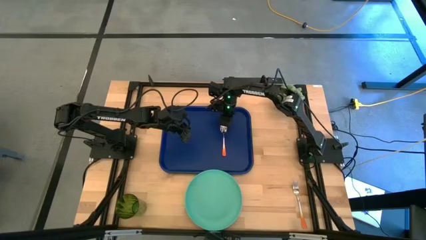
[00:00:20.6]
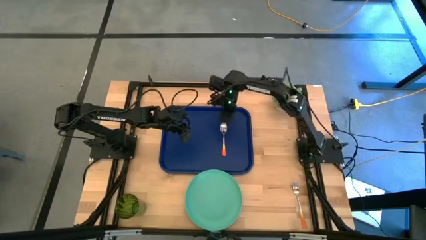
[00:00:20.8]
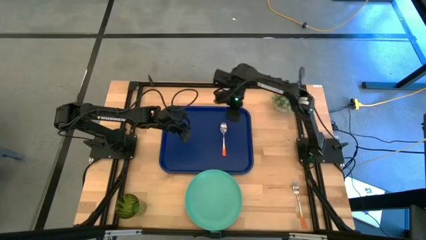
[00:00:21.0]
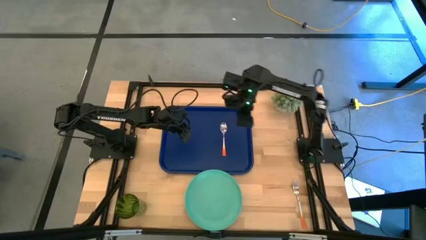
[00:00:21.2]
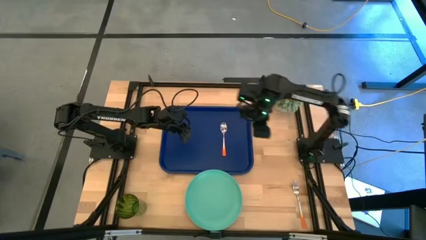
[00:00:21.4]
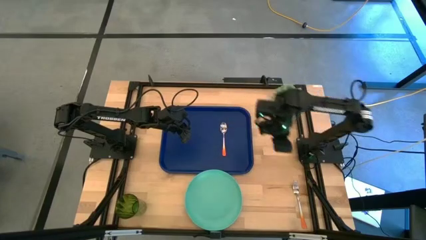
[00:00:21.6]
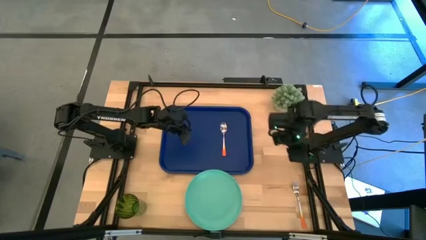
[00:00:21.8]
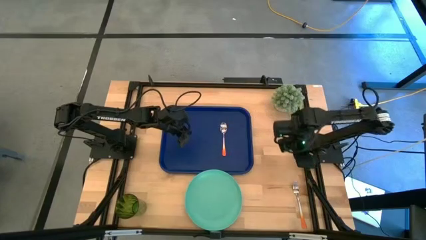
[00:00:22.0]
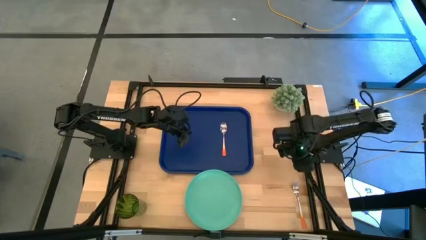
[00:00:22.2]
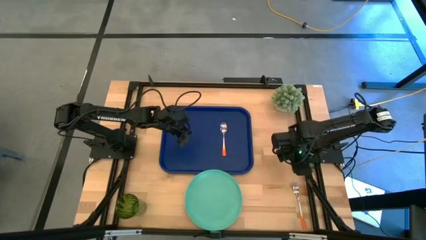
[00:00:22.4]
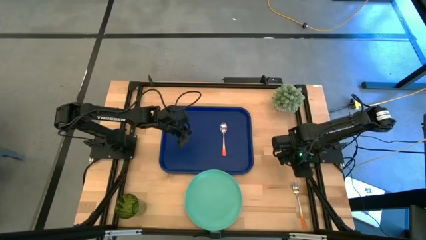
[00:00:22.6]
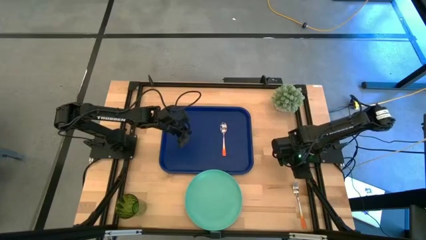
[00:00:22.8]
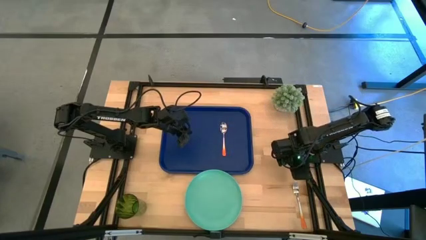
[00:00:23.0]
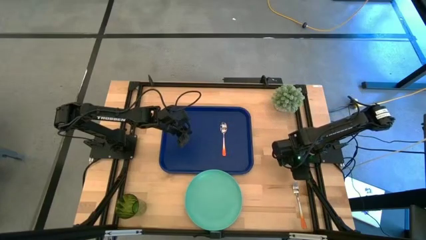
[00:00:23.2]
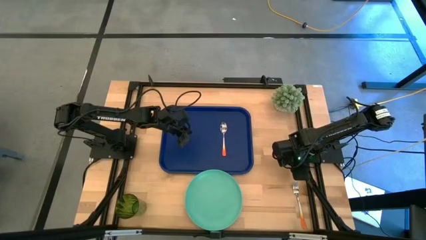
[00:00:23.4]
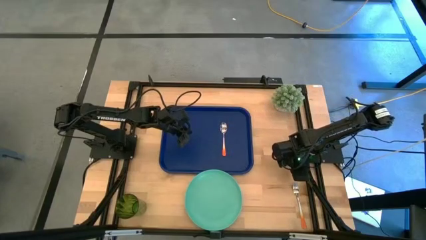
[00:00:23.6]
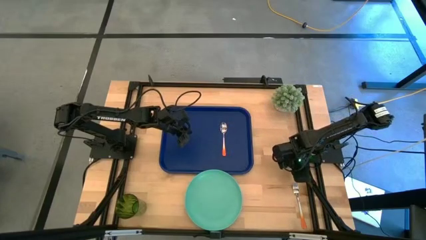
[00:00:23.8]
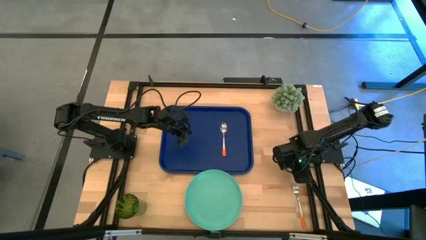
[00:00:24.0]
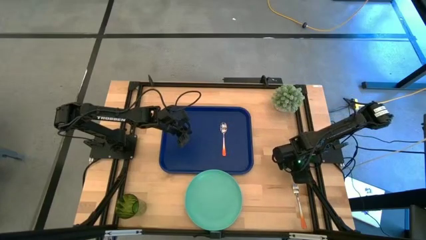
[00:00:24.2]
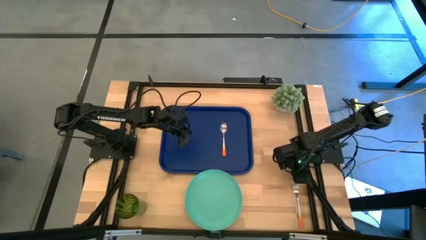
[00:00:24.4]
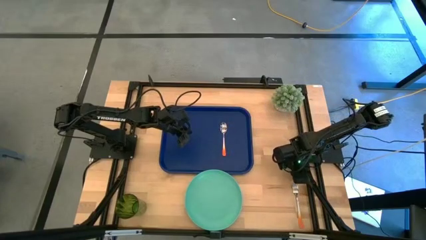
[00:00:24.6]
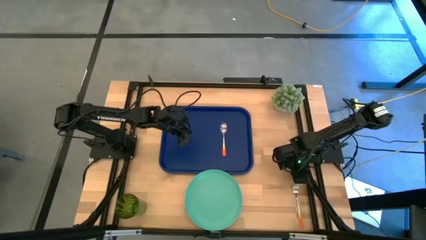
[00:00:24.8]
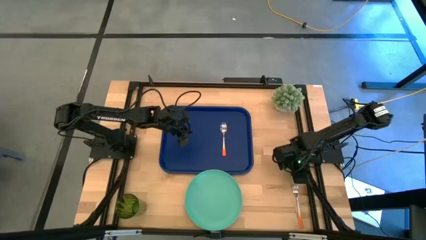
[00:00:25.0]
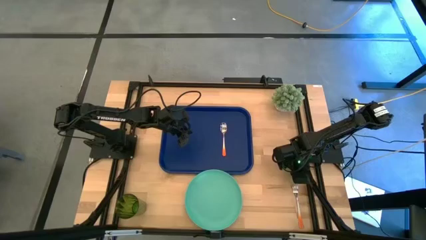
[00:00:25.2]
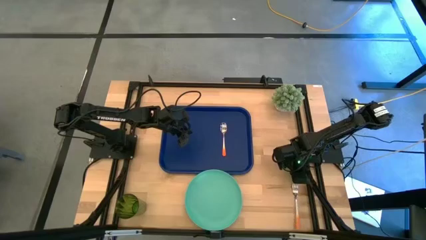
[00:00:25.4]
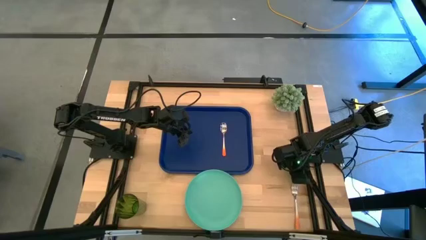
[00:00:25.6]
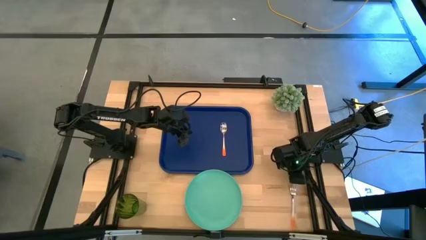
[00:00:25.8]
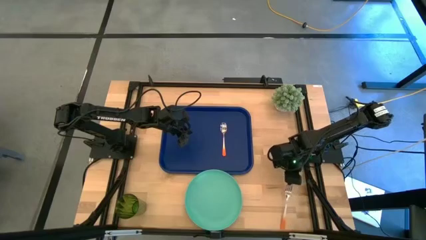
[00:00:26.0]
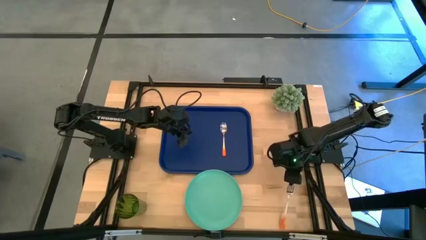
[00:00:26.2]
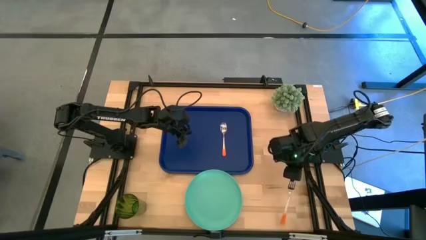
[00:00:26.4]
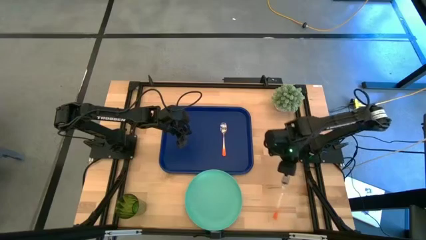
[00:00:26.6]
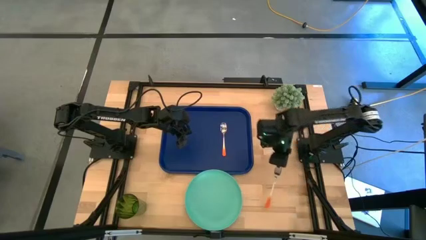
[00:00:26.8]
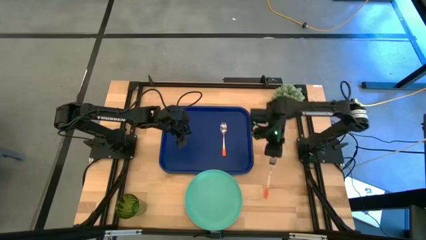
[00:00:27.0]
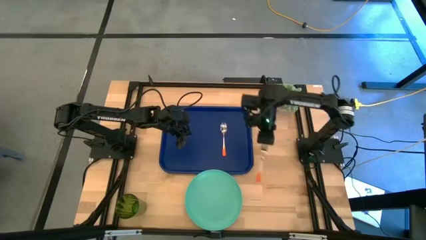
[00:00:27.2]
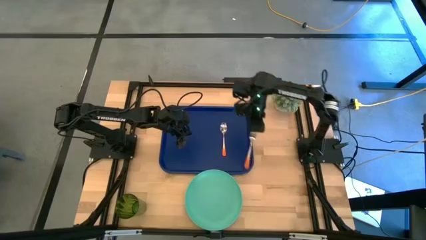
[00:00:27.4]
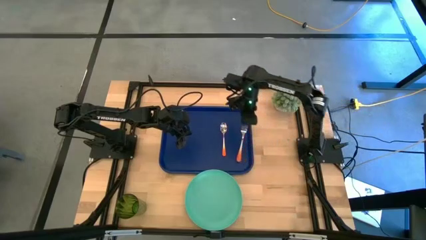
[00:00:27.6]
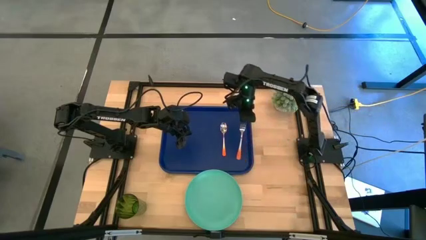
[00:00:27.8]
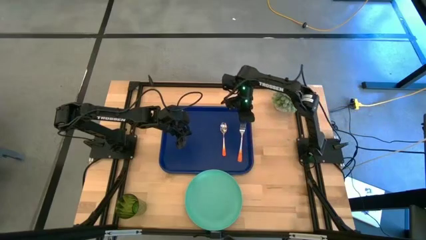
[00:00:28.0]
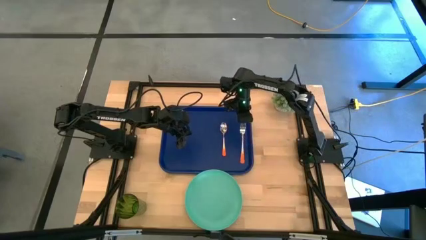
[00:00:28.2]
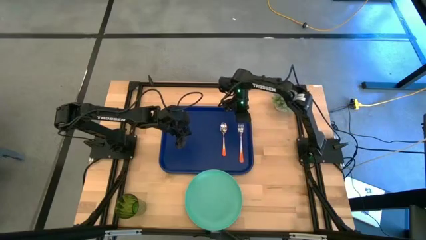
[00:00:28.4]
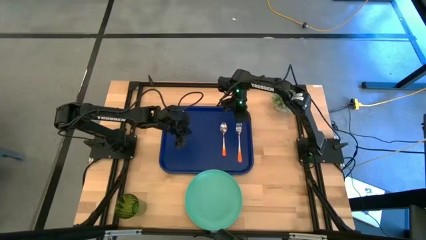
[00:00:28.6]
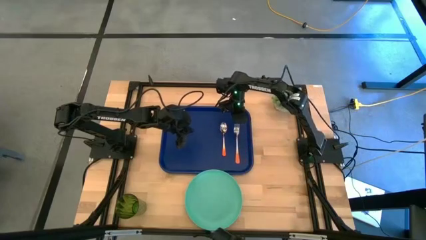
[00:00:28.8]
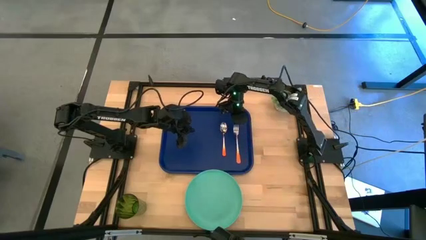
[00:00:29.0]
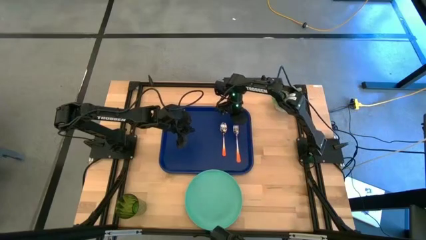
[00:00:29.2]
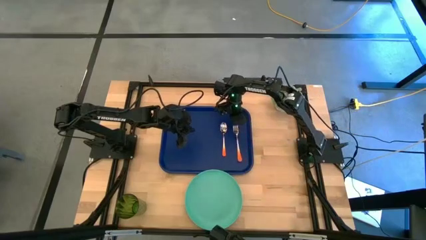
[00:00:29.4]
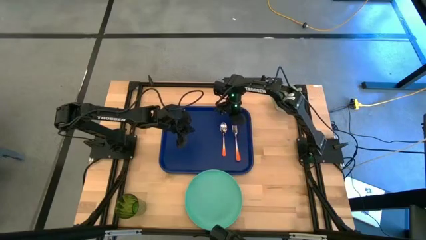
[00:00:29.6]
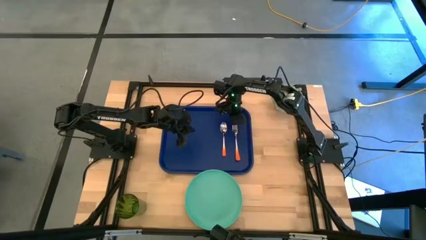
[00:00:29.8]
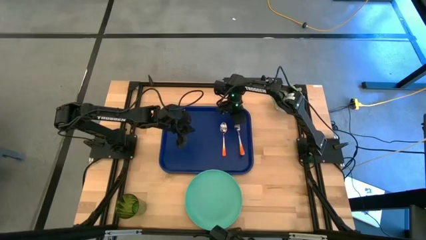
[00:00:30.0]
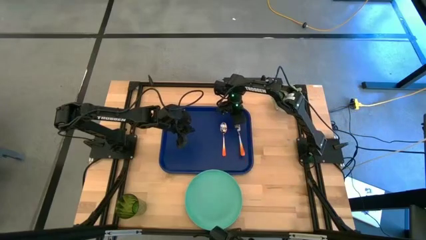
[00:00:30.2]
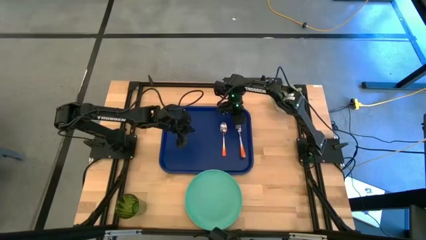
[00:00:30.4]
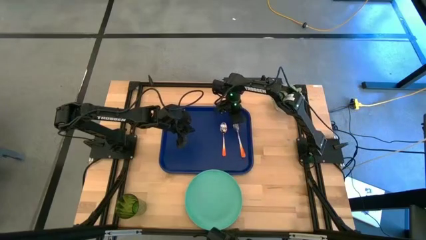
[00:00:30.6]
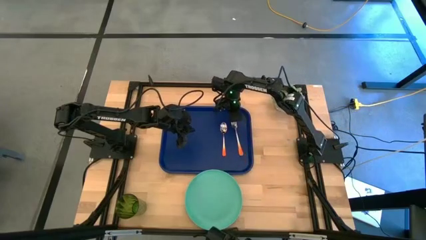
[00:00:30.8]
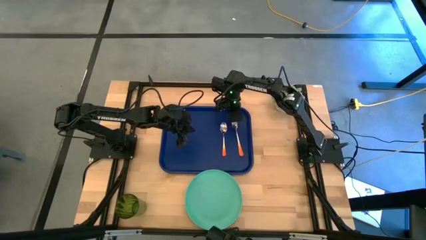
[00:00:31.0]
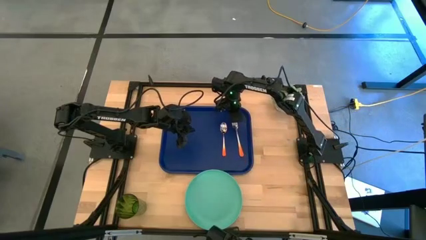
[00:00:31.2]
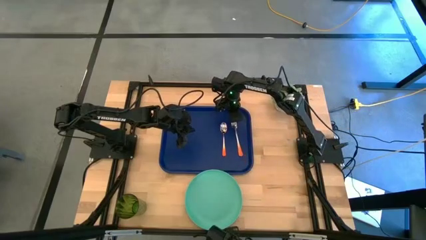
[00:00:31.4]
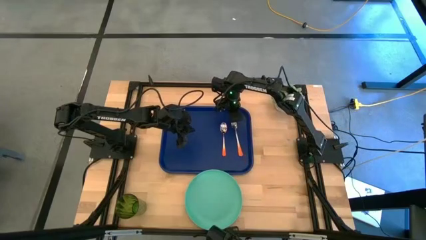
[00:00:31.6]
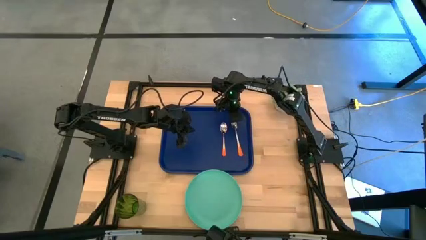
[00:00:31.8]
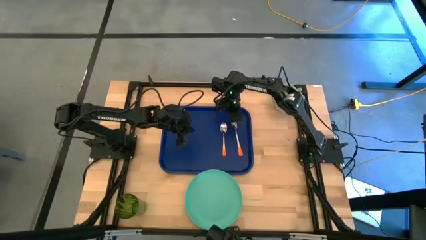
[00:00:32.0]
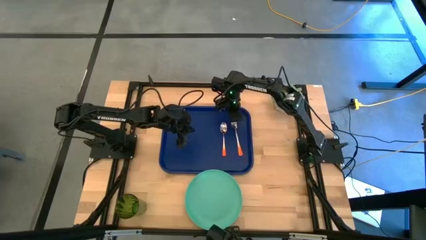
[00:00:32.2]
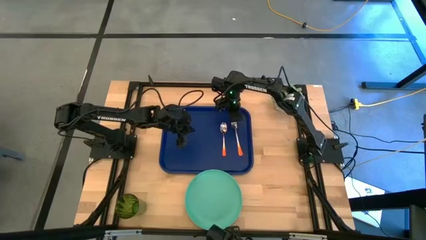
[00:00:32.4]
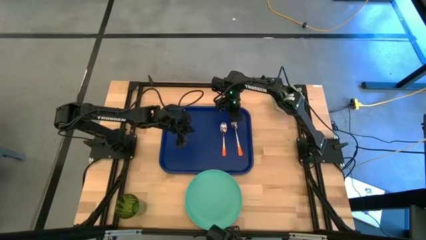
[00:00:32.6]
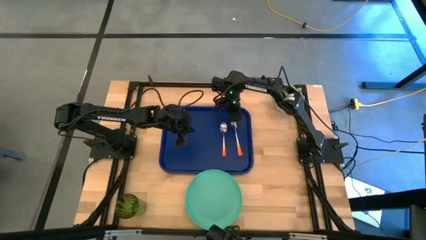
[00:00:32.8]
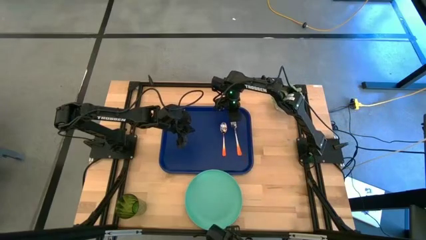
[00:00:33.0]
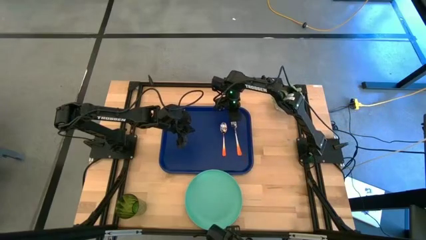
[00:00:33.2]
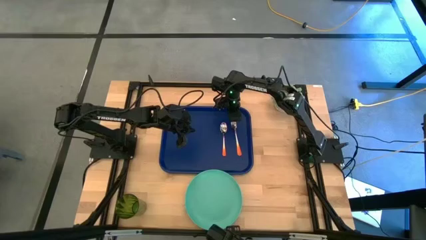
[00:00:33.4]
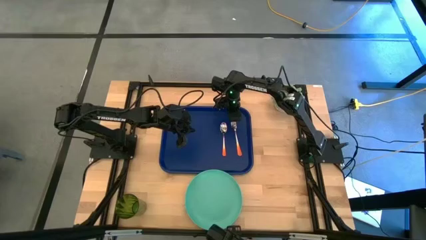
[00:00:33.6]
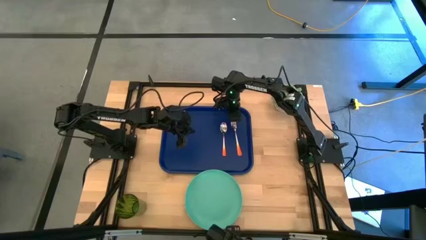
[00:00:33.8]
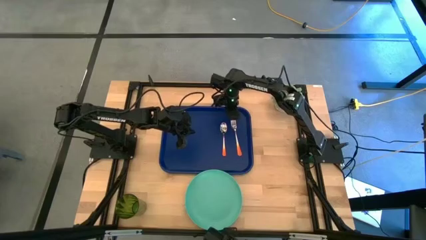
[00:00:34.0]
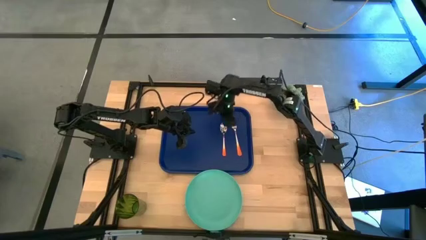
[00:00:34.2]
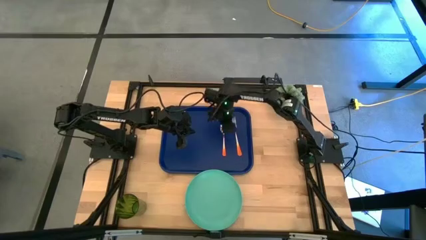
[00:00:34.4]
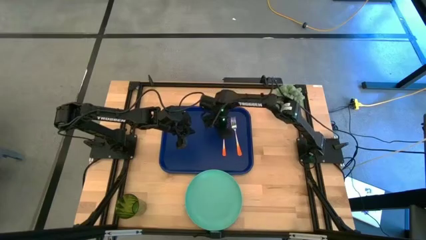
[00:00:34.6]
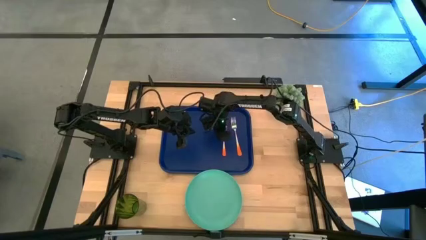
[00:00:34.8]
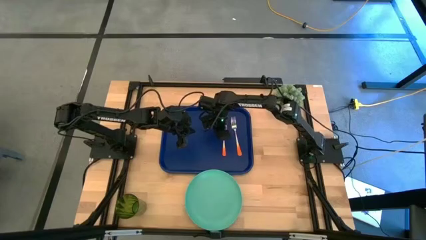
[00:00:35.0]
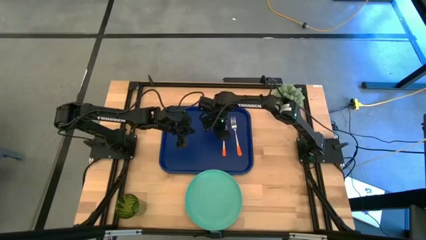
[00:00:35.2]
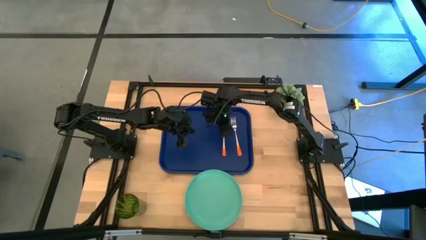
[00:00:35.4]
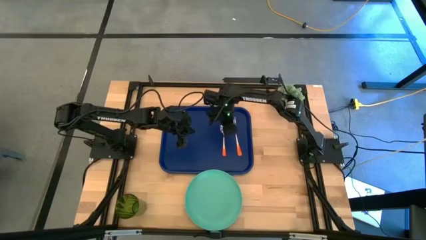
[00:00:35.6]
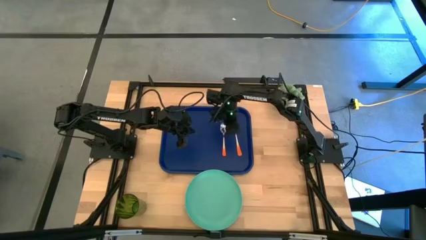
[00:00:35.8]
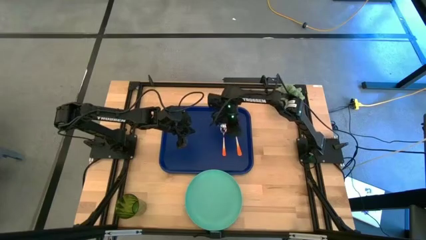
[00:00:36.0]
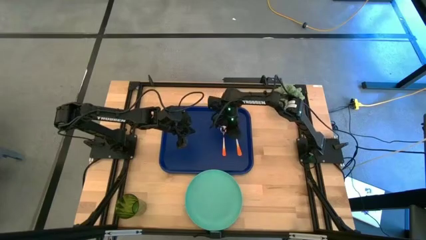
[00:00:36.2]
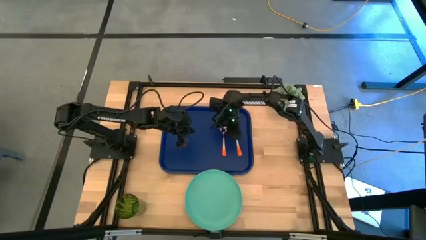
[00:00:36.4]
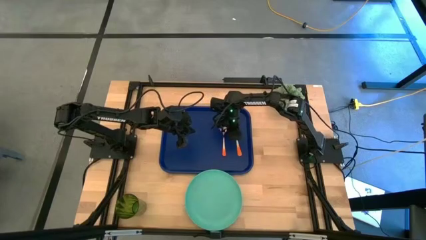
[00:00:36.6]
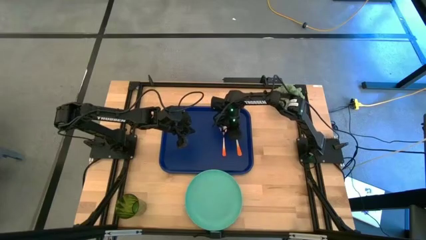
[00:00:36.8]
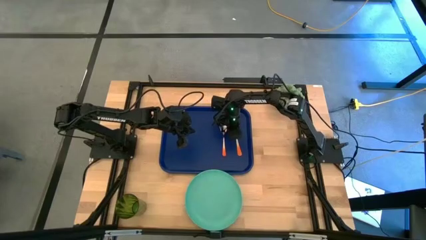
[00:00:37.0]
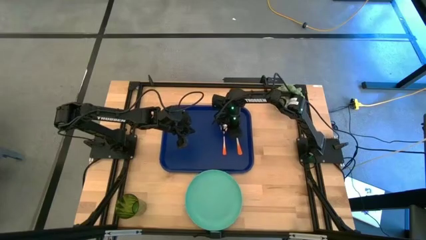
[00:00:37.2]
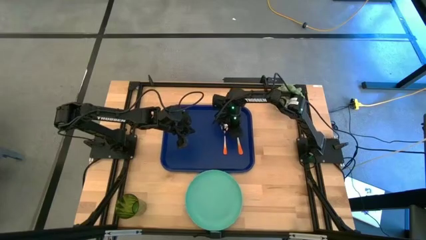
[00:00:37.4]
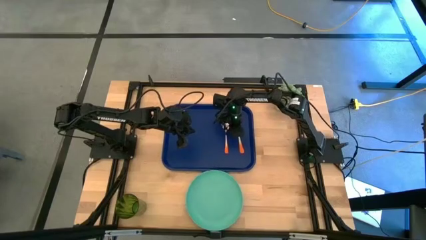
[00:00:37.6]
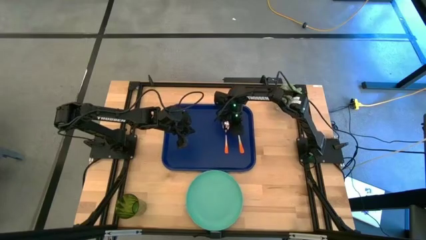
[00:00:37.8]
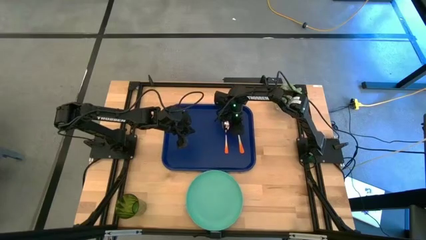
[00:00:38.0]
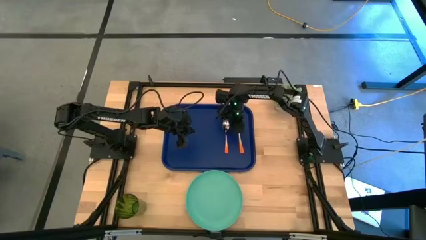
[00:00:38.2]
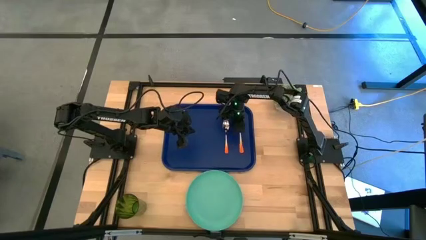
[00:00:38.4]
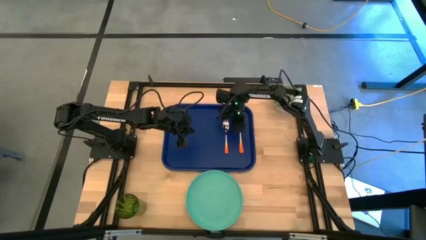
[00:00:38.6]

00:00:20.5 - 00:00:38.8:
Task: Pick and place plate/cup/fork/spoon on tray
Put the orange fork on the serving tray to the right of the orange spoon
